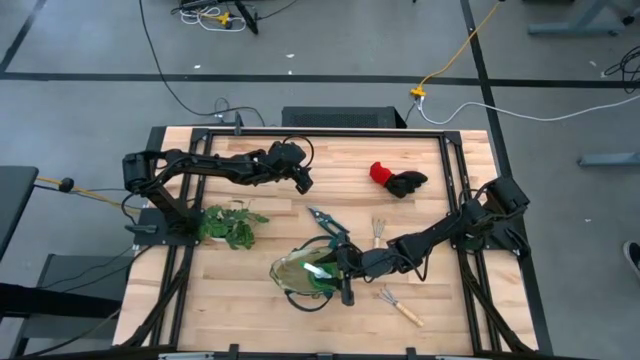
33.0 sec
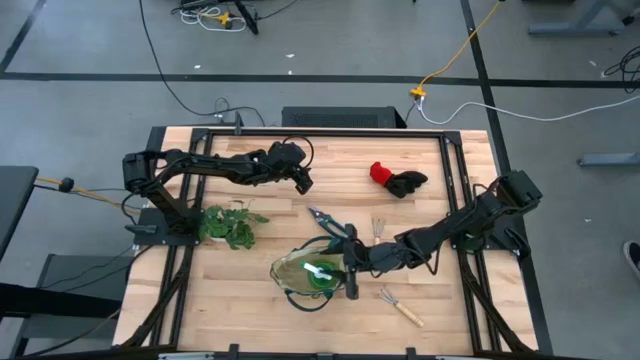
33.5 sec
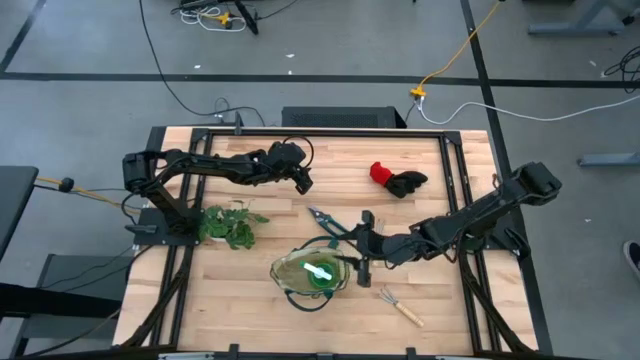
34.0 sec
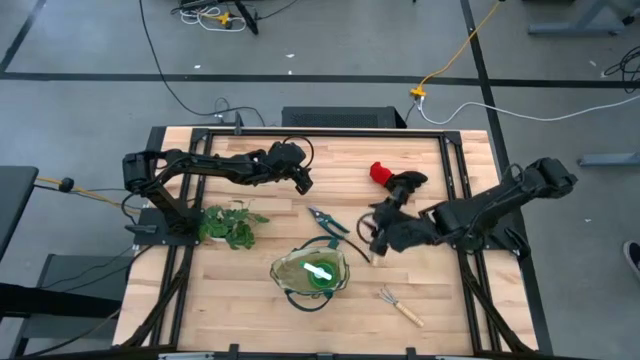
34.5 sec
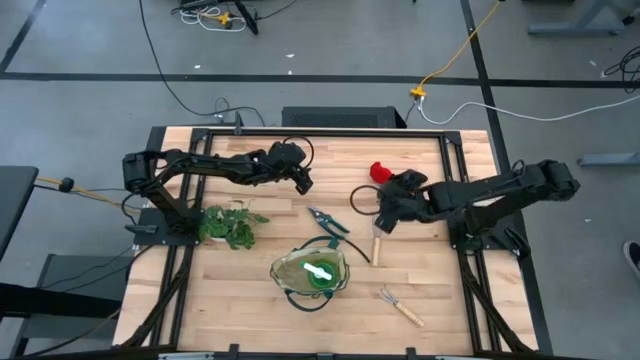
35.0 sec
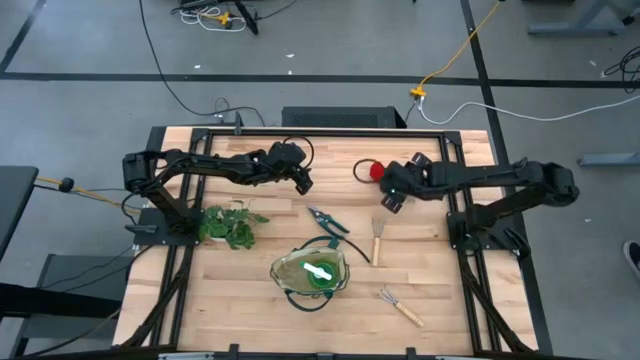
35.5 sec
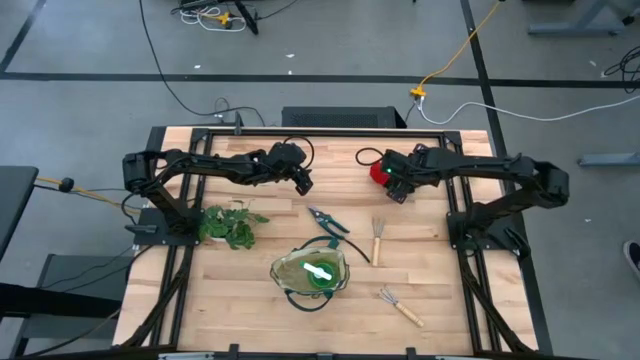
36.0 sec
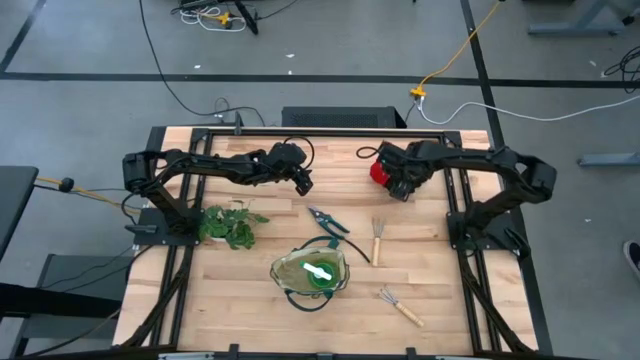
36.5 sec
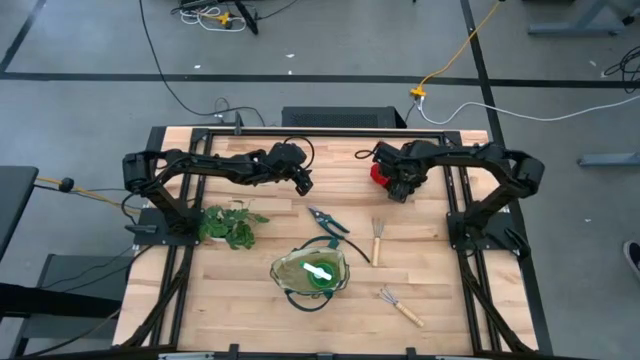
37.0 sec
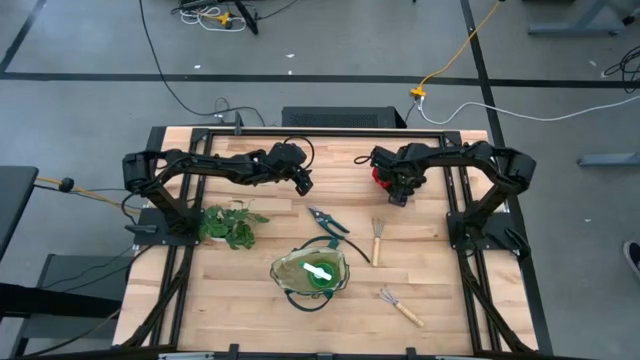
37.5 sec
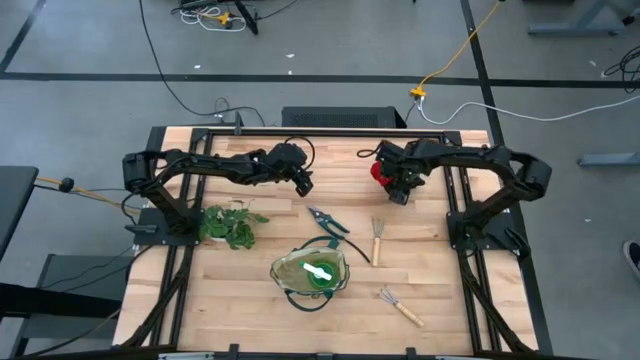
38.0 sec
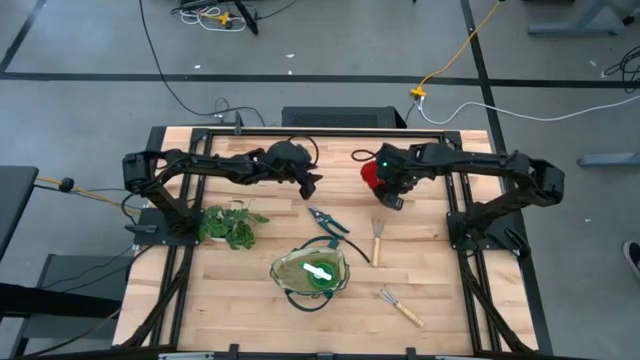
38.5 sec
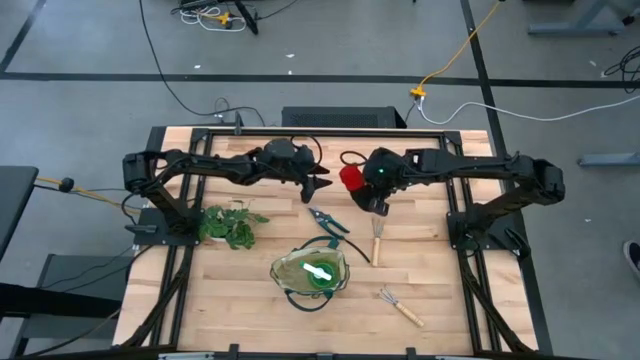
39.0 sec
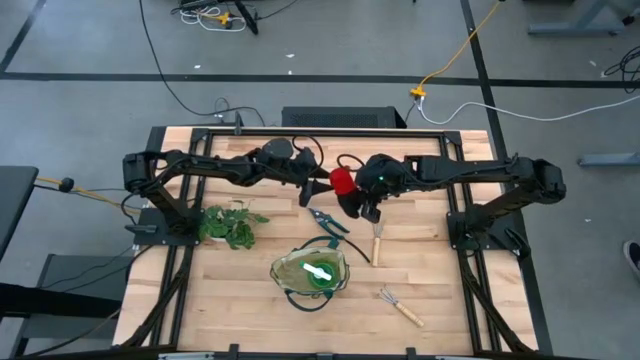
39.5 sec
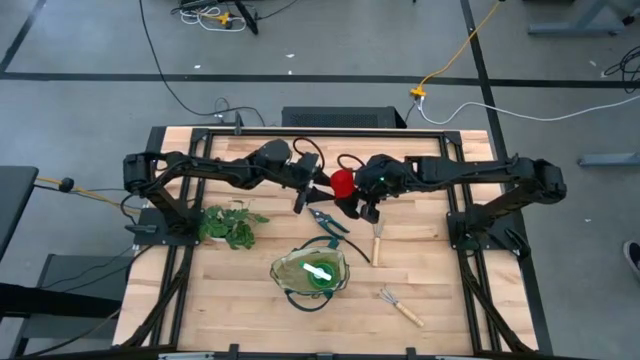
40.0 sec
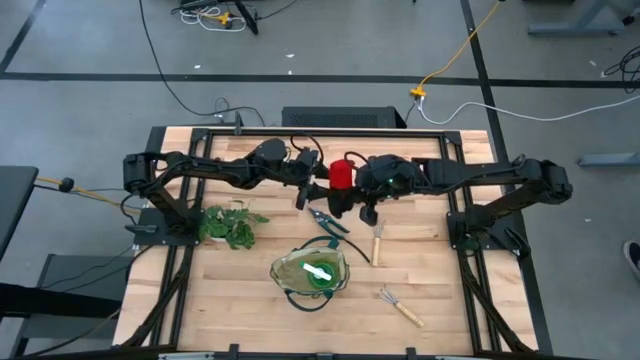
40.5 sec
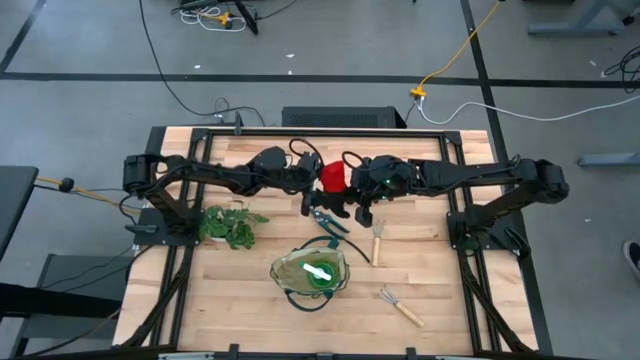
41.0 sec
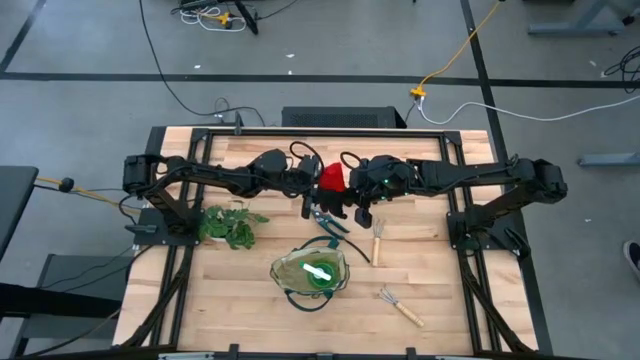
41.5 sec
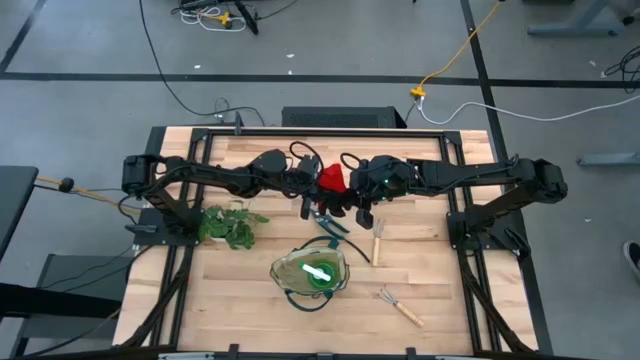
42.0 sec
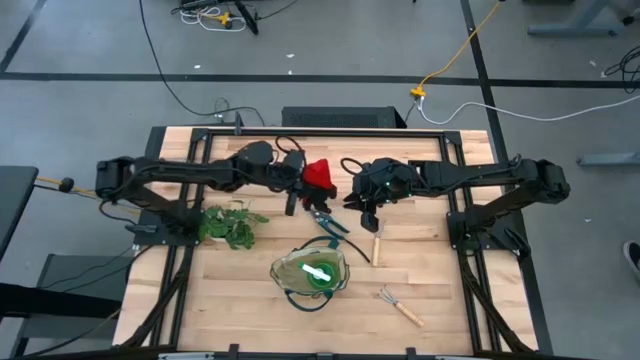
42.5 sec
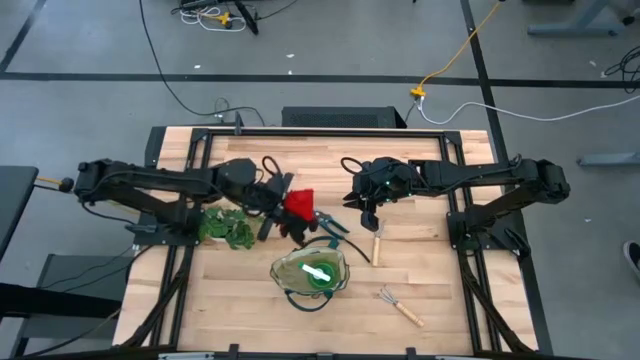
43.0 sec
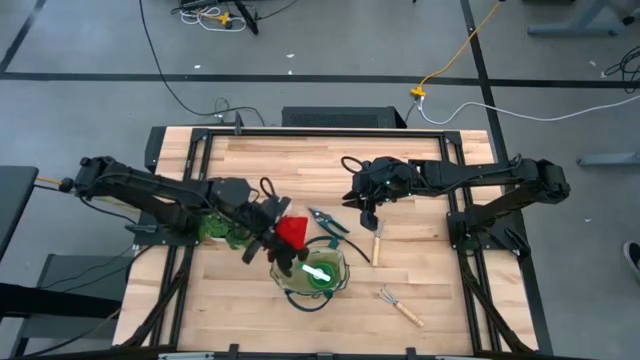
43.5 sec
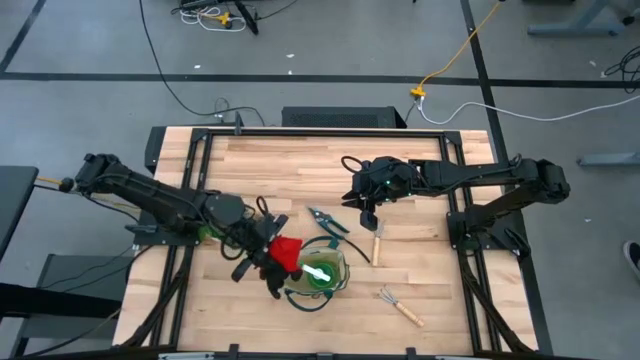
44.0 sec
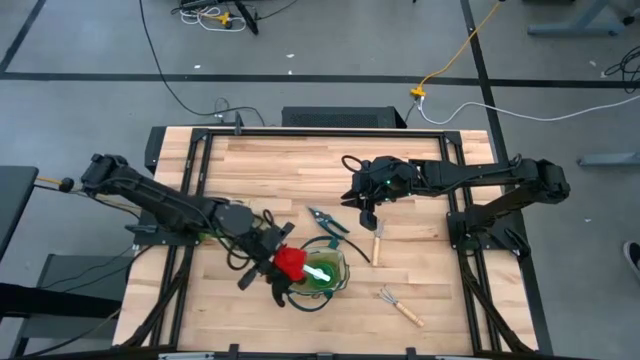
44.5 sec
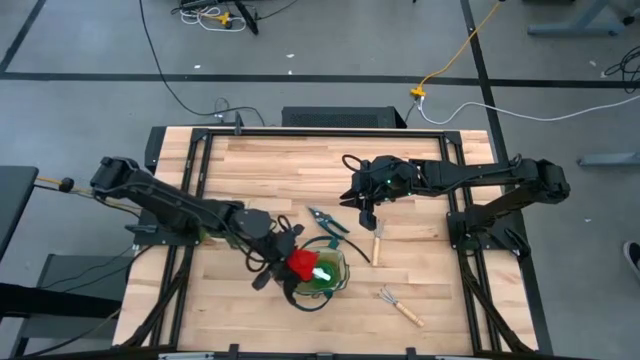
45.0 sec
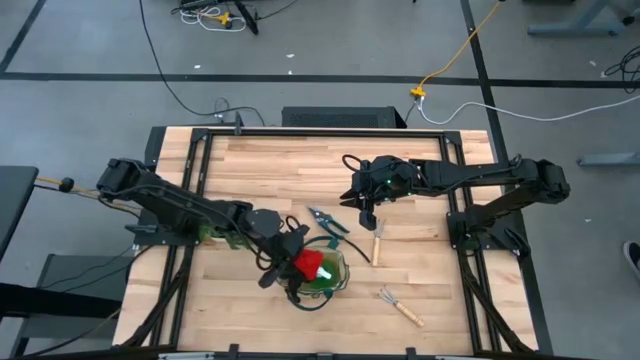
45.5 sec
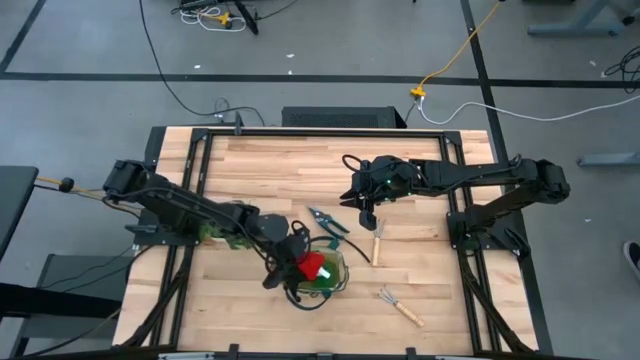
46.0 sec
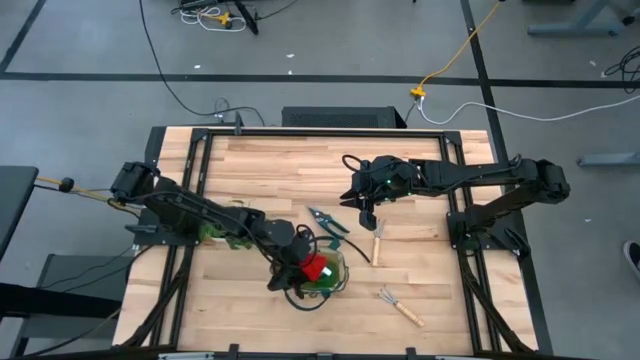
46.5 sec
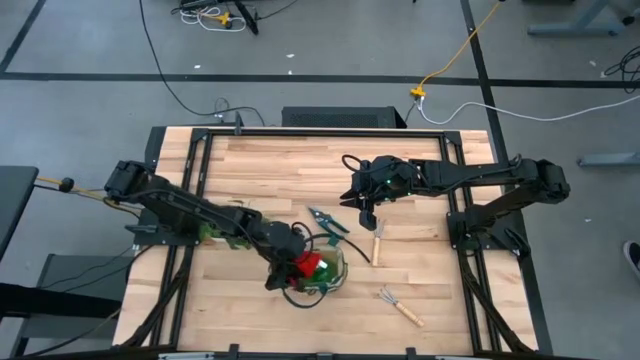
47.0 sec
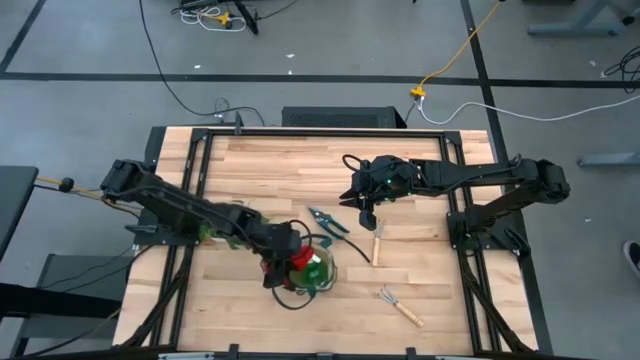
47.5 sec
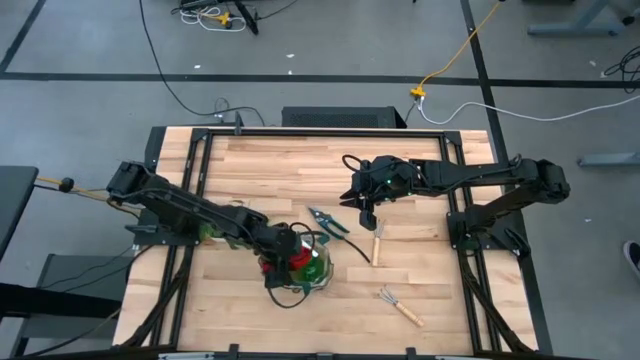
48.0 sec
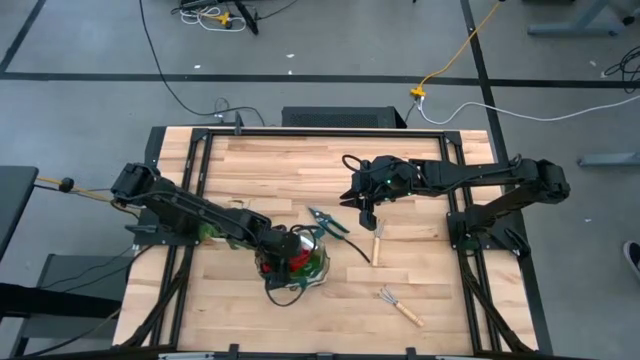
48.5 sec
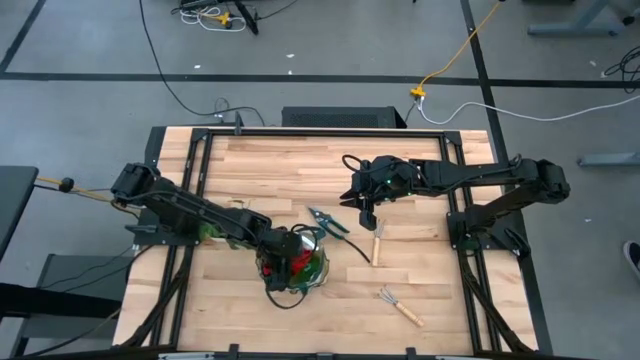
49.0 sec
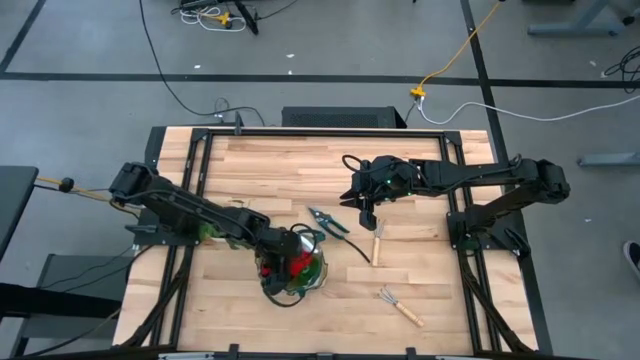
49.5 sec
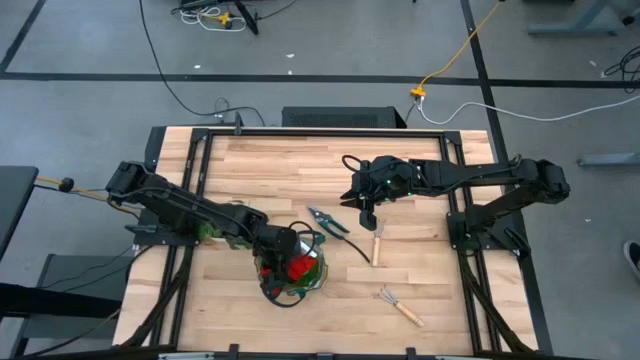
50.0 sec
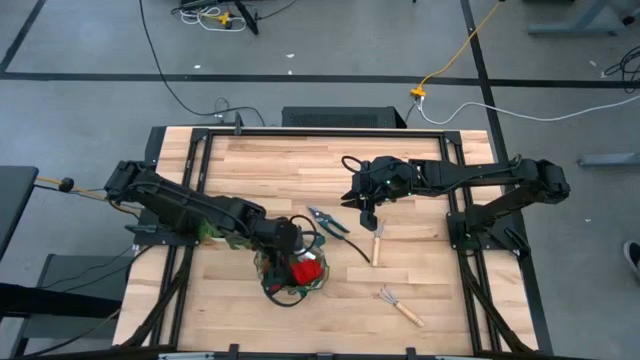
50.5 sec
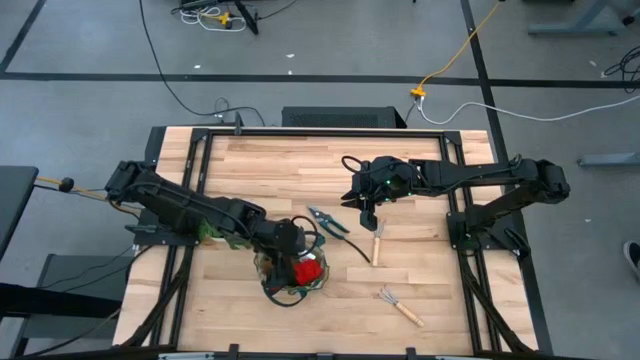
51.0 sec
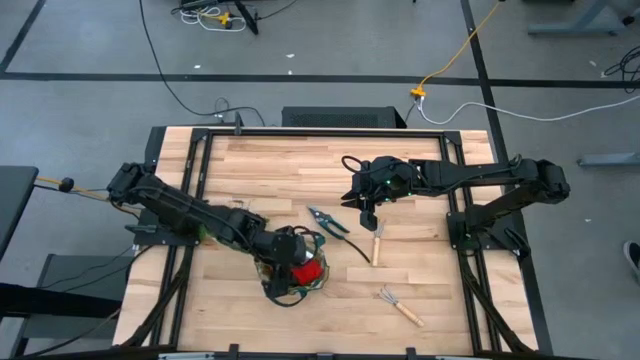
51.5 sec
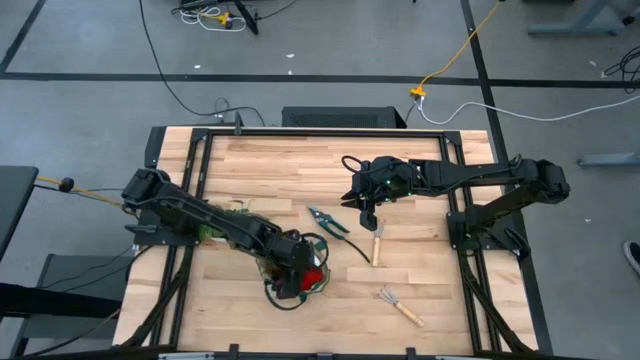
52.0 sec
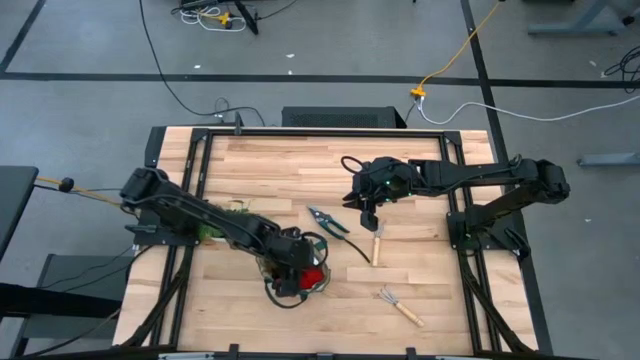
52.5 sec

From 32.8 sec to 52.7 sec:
Task: Pick & Place Garden tools in Gardening bag
Put the red and black gloves into the gardening bag

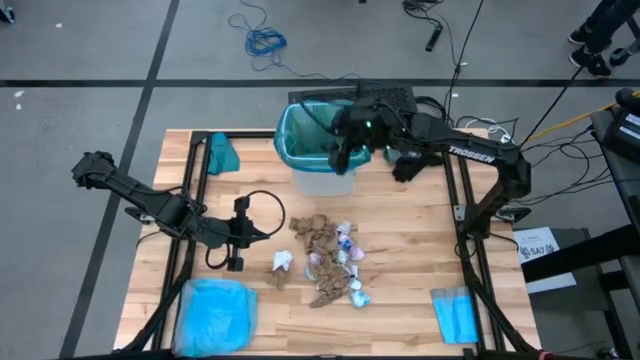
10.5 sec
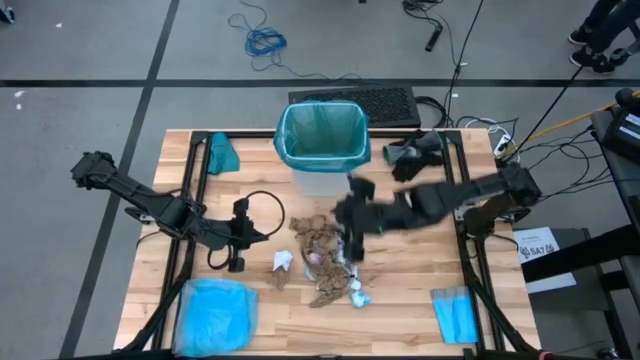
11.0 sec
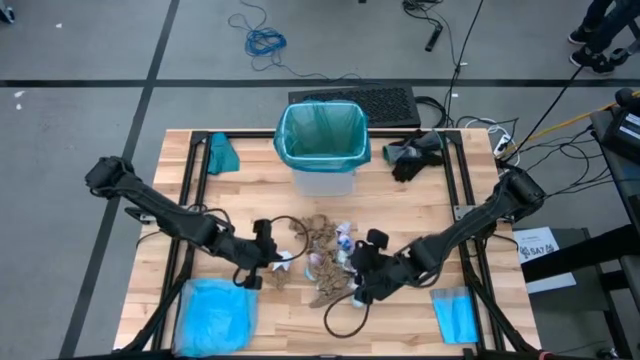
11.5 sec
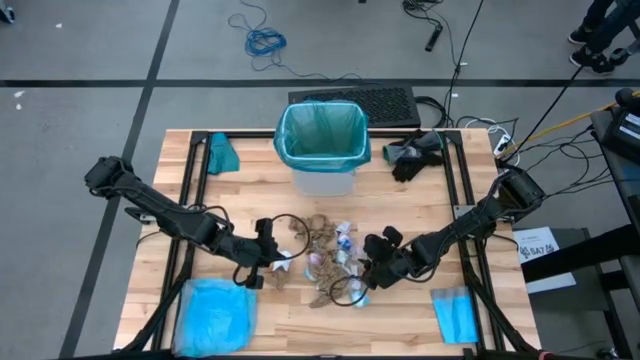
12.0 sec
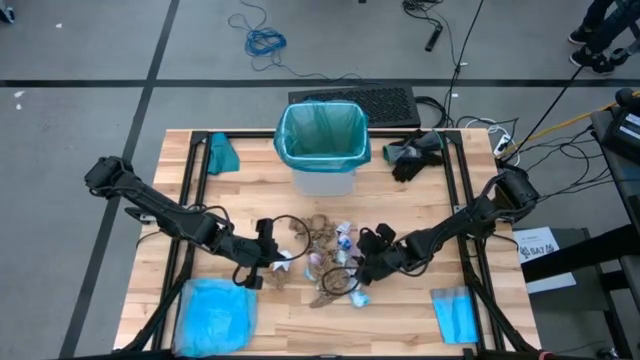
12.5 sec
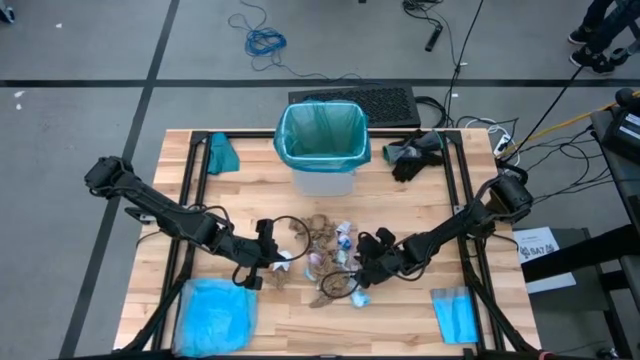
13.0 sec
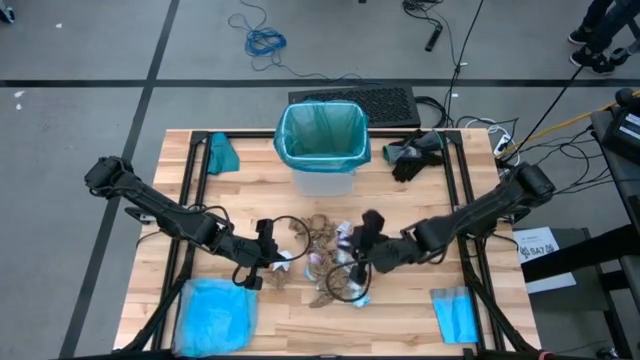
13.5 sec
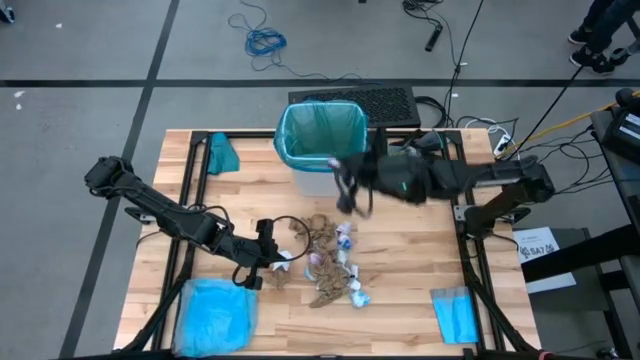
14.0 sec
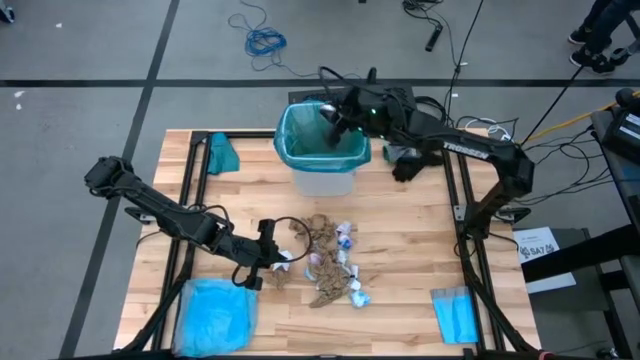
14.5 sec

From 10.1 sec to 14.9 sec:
Task: place trash/remove bag and relplace
Put the pink trash bag into the trash bin
